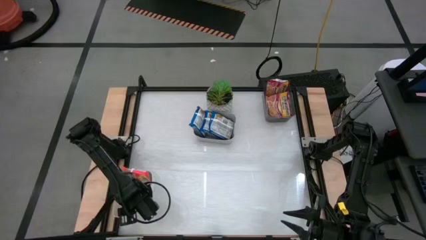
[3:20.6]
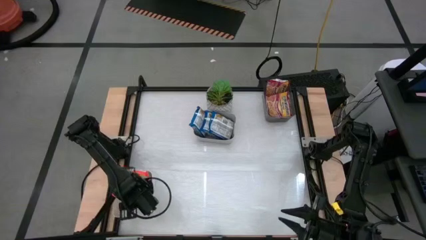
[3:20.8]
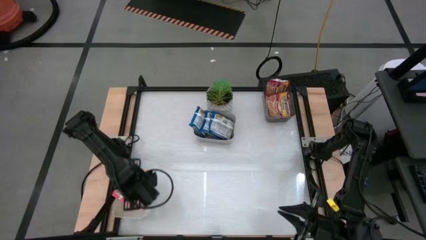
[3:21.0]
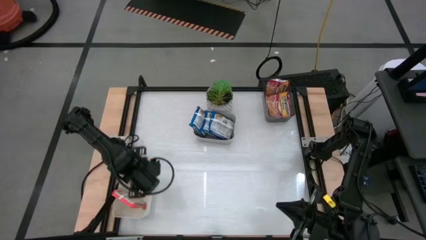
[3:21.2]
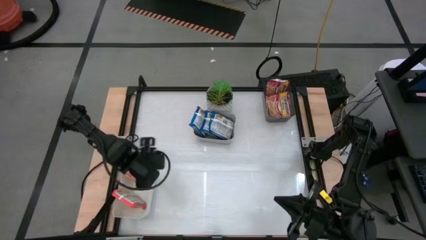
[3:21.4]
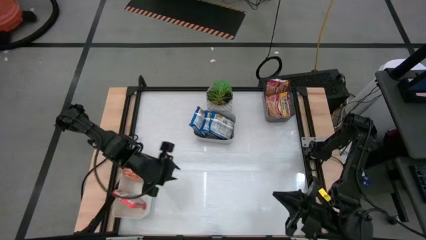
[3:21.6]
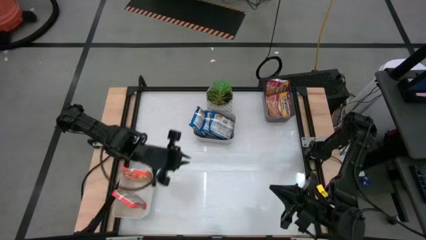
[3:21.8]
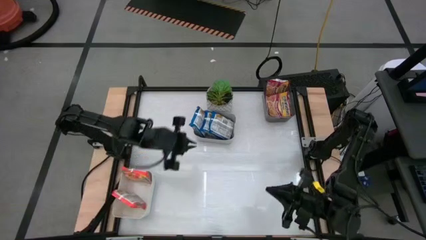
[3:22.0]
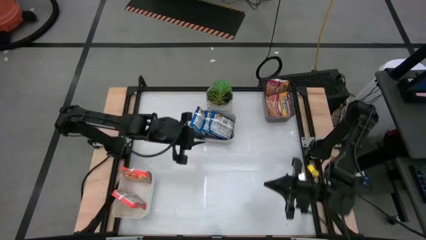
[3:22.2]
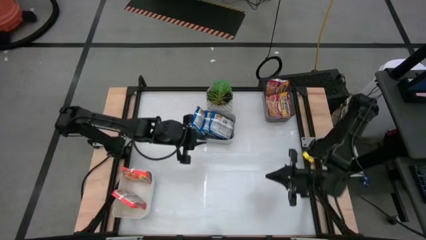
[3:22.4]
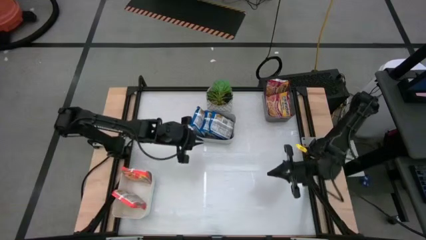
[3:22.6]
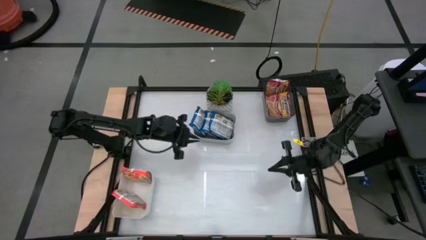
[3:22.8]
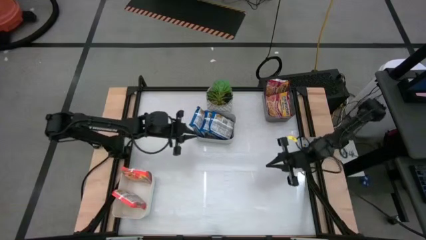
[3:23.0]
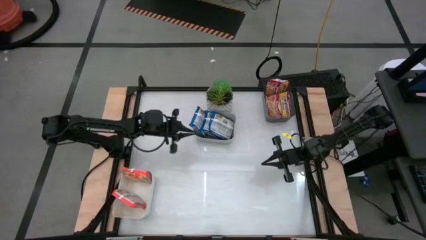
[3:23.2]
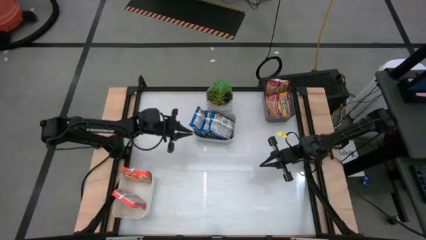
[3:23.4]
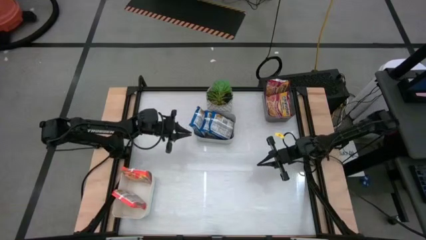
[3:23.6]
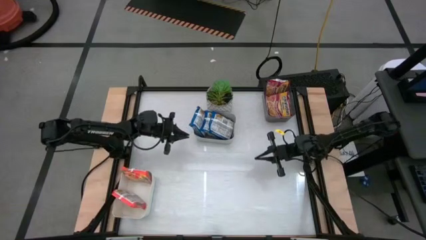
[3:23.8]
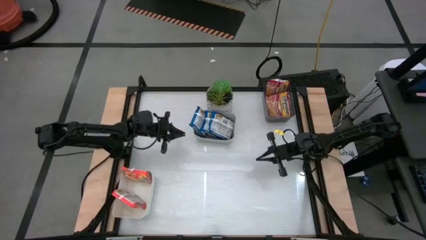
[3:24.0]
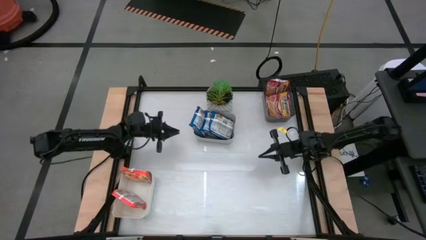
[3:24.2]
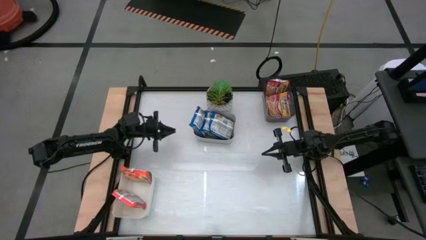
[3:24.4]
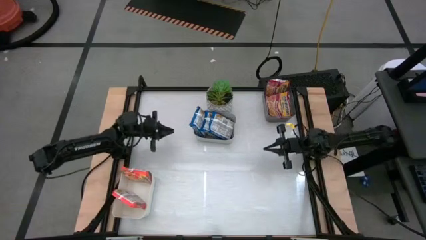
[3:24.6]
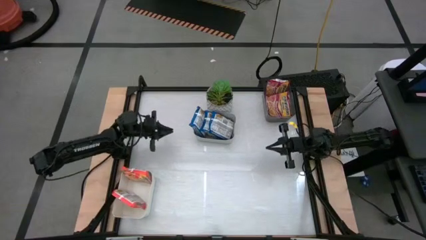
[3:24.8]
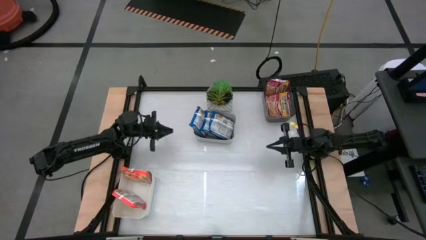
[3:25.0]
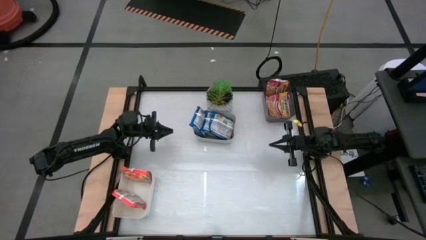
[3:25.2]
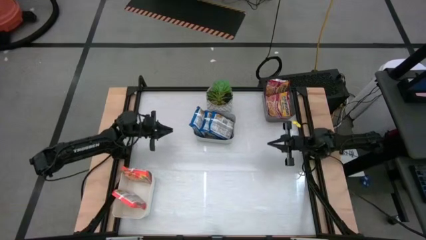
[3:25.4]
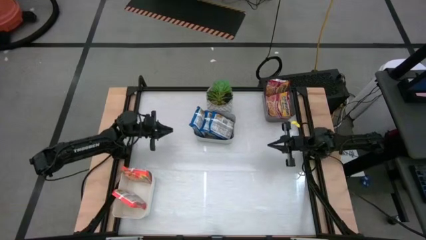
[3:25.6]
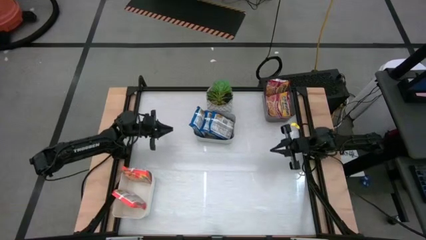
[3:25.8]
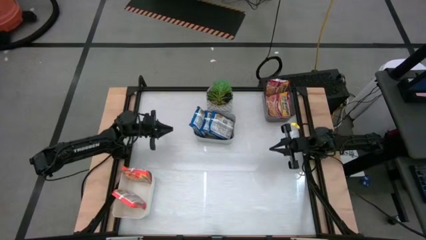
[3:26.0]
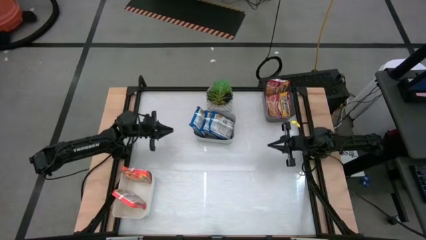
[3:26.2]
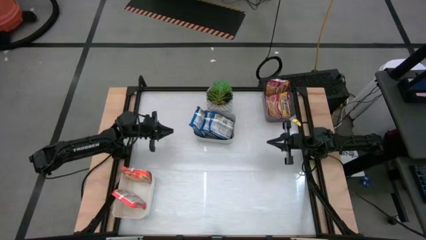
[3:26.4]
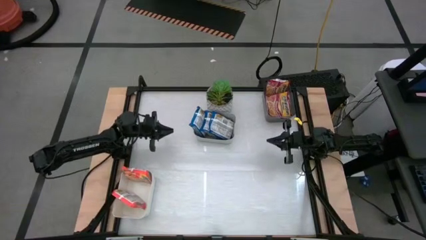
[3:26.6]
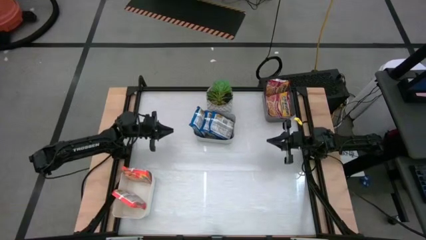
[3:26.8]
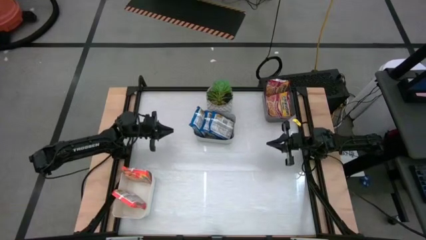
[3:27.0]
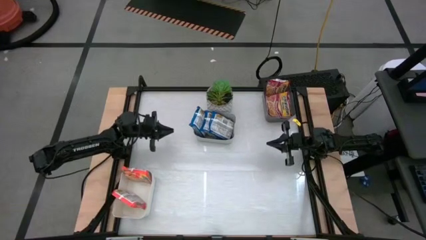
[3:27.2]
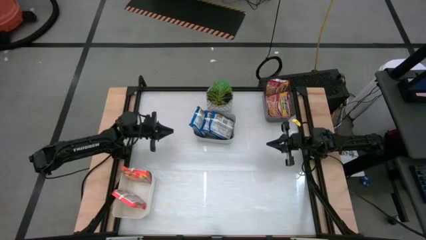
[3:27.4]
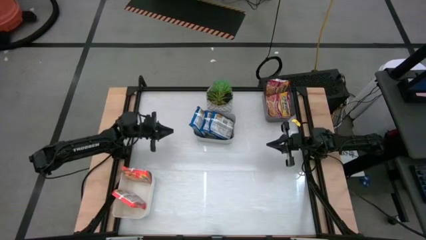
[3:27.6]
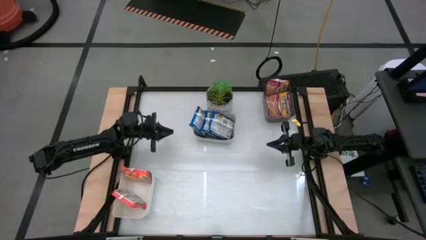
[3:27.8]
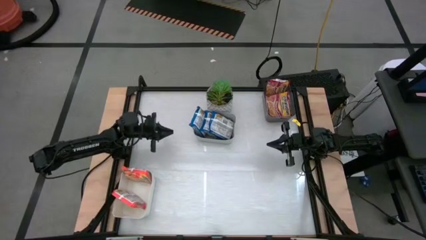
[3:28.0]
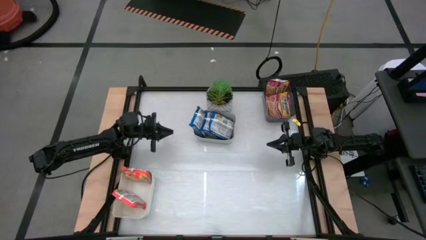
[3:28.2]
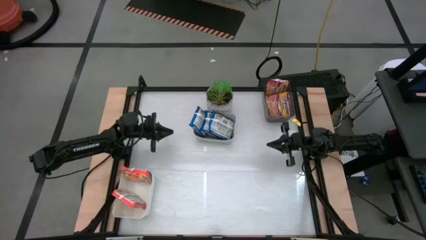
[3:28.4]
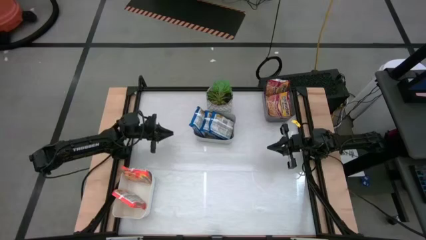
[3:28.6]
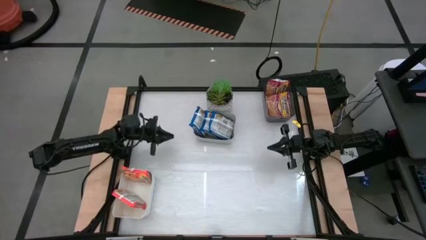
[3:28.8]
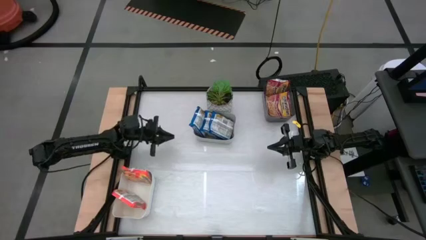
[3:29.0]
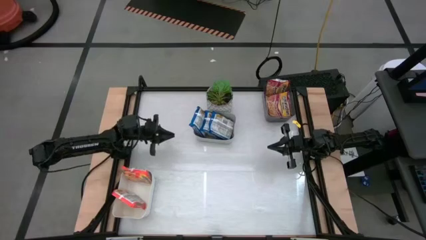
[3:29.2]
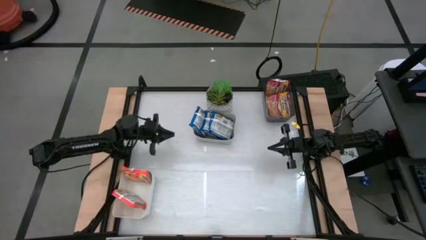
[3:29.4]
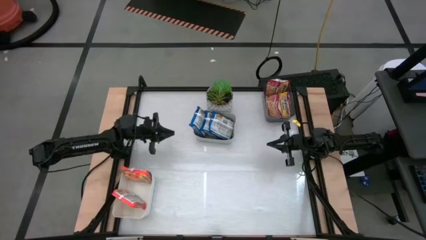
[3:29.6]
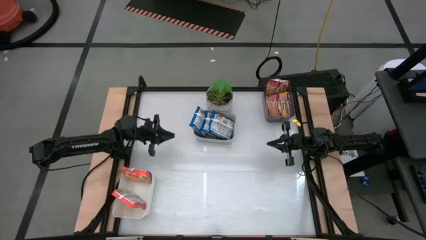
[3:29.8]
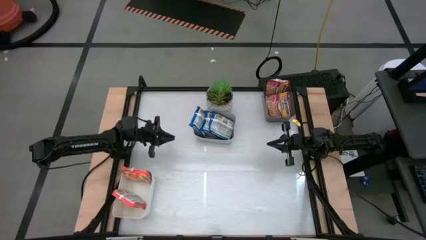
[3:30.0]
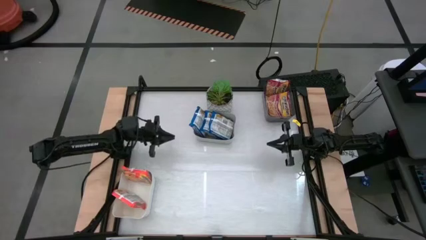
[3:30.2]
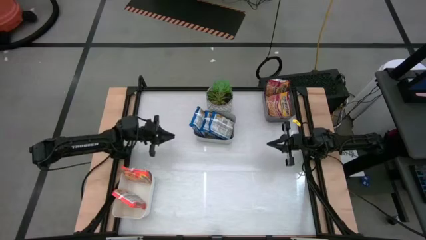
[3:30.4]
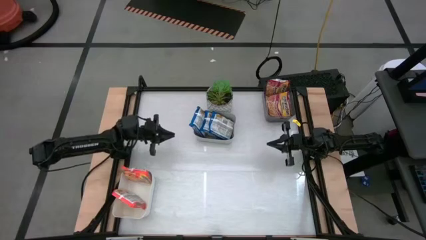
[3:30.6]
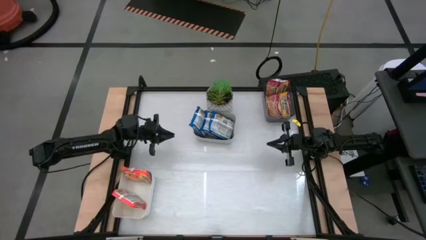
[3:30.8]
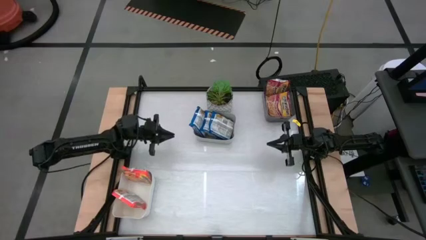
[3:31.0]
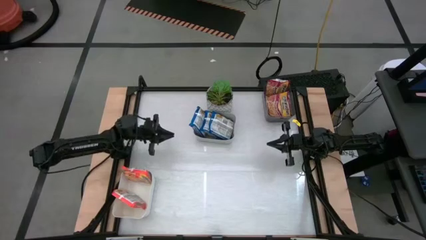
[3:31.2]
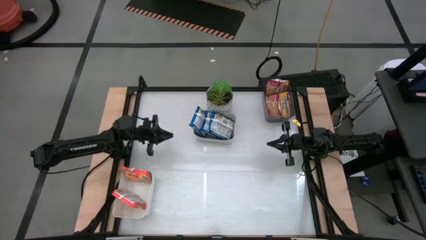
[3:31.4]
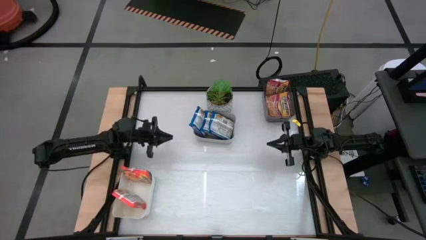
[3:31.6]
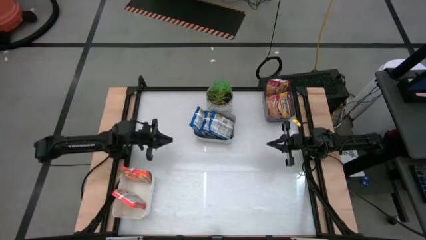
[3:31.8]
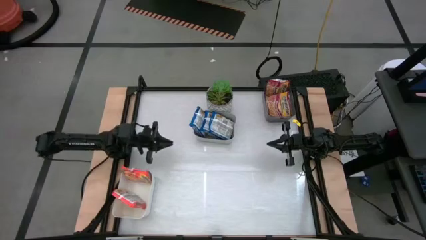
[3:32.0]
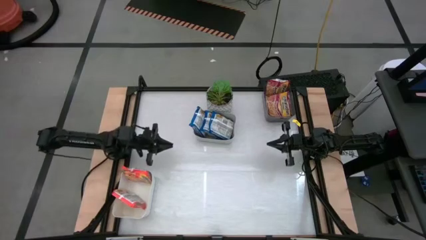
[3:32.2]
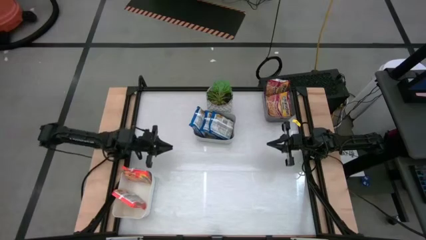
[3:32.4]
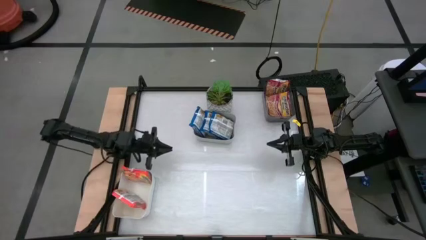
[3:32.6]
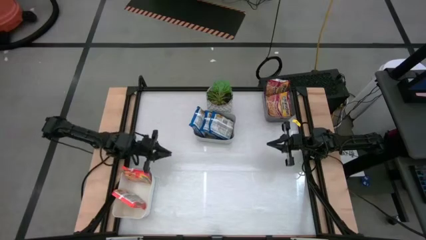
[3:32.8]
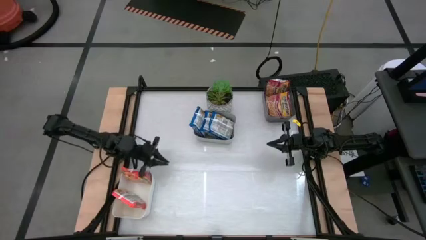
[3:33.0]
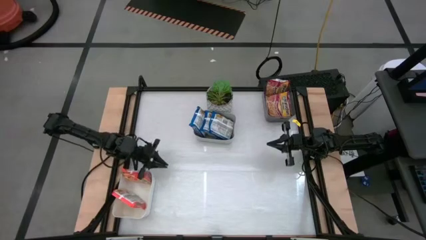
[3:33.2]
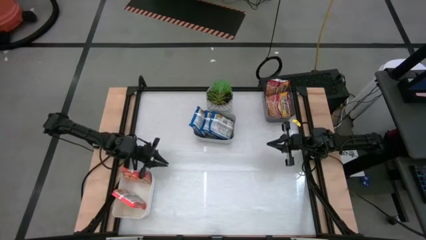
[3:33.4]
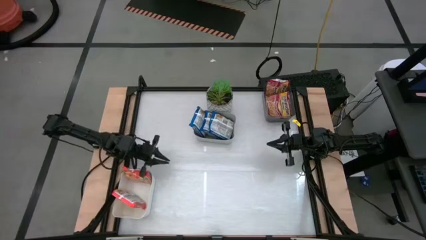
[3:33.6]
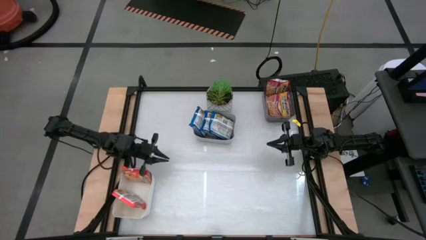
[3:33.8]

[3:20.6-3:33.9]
Task: Sort Maruchan noodles
Return to Home Position

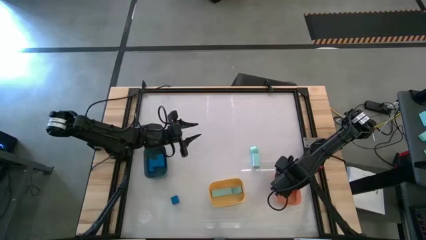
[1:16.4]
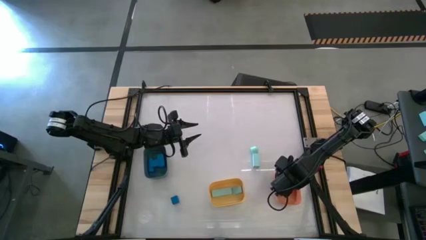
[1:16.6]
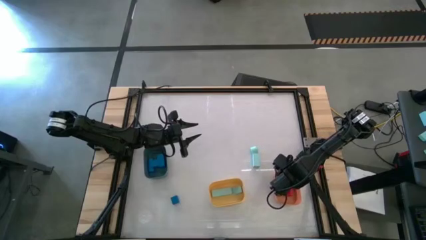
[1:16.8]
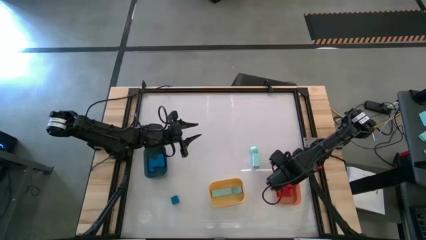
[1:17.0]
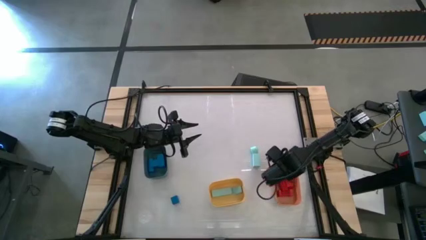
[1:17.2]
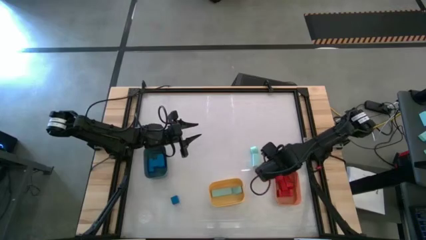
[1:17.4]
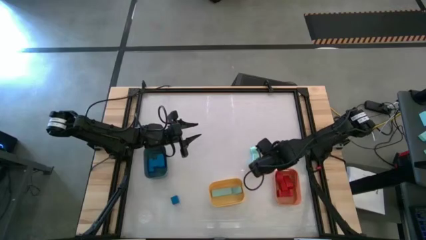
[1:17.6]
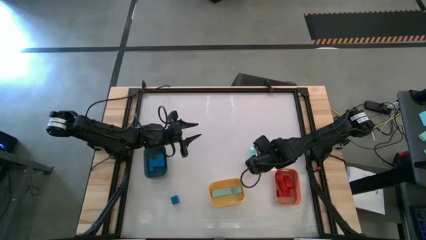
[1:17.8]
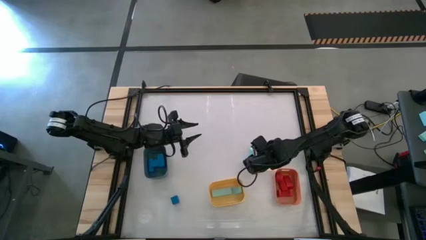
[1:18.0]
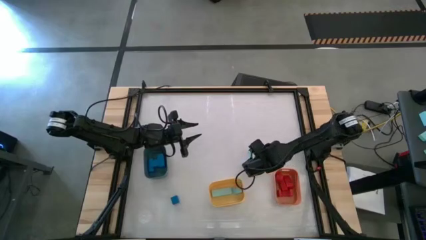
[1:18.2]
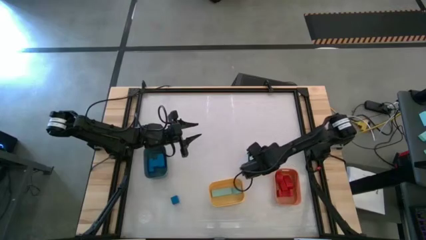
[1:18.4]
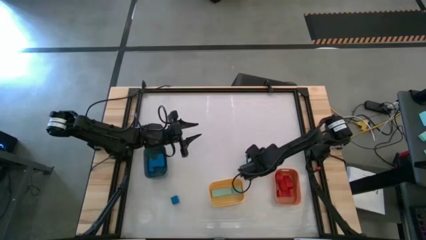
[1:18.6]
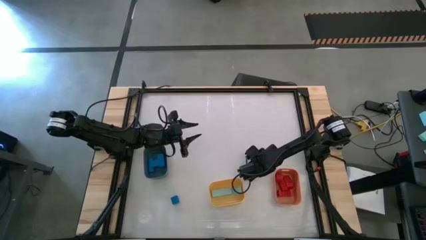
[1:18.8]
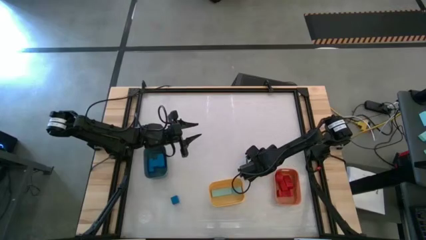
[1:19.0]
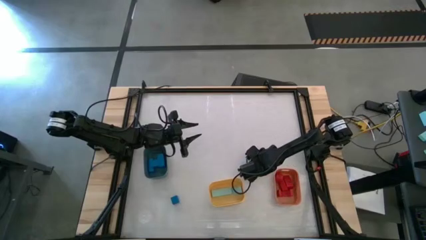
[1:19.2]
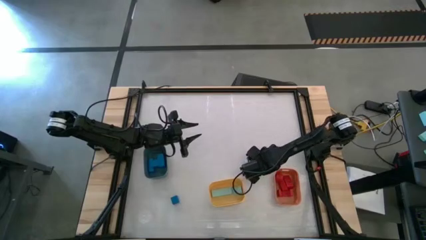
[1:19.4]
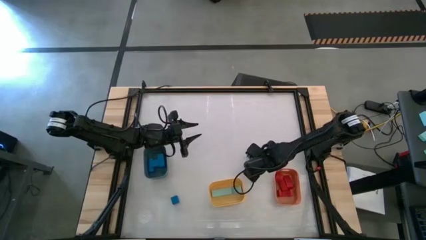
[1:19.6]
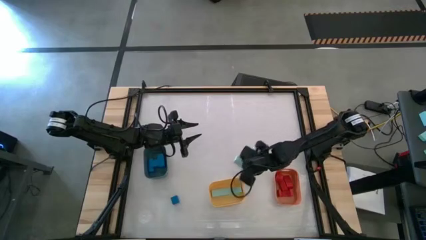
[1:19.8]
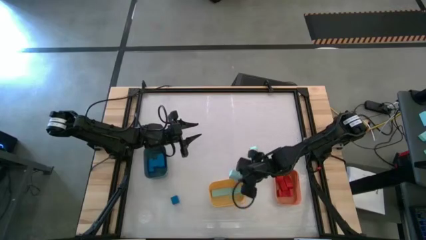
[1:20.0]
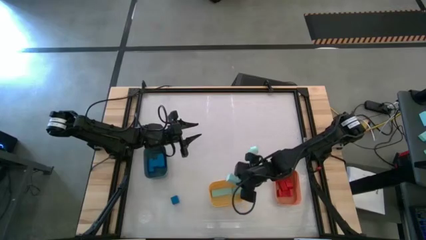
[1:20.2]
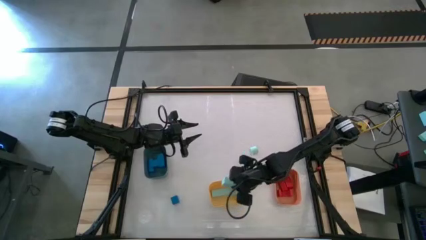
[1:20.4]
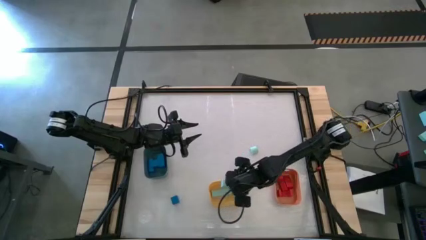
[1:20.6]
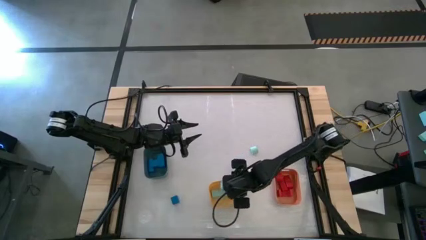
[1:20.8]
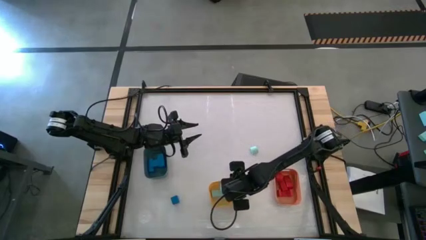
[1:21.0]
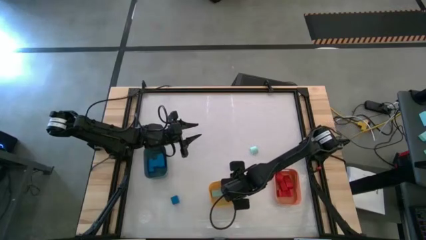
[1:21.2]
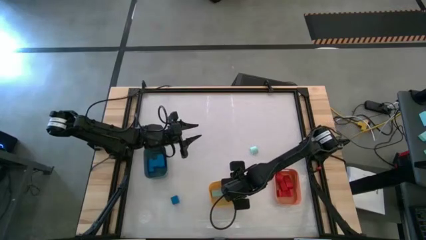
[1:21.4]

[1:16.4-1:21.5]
Task: Sort & place blocks by color
Put the light blue into the yellow bin
